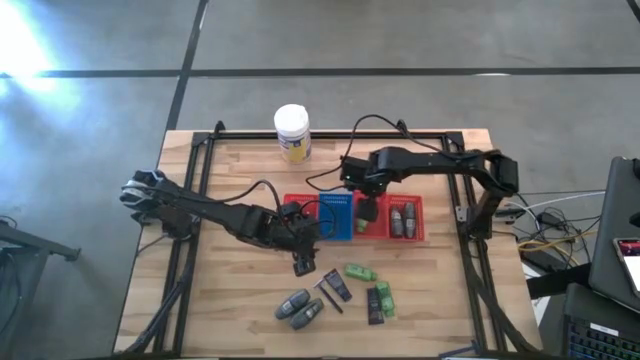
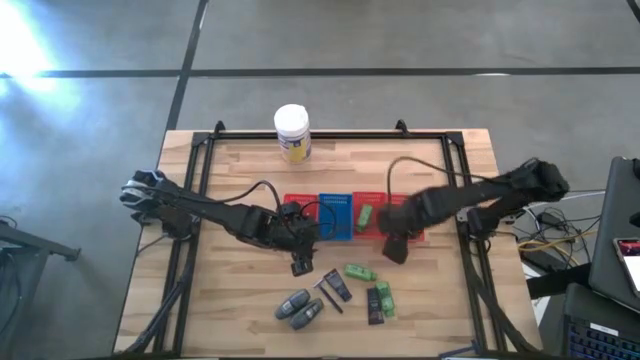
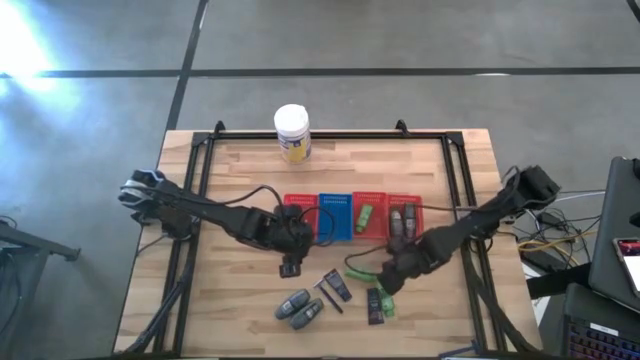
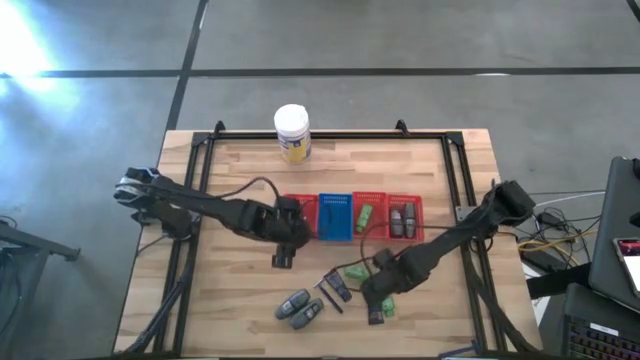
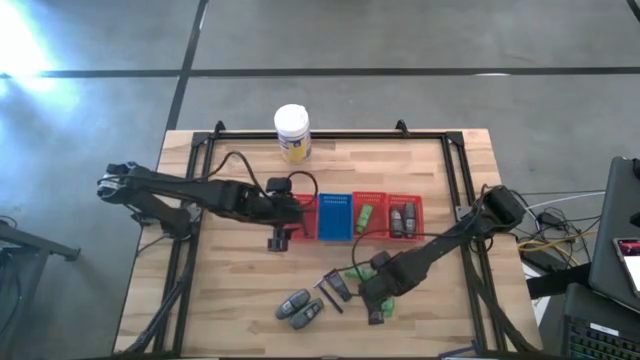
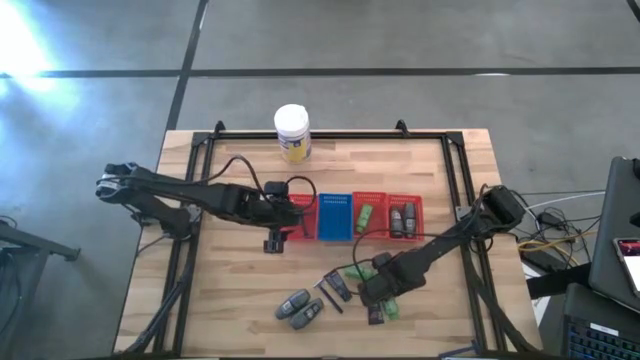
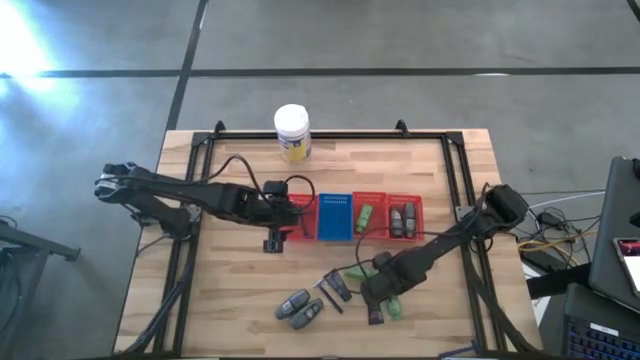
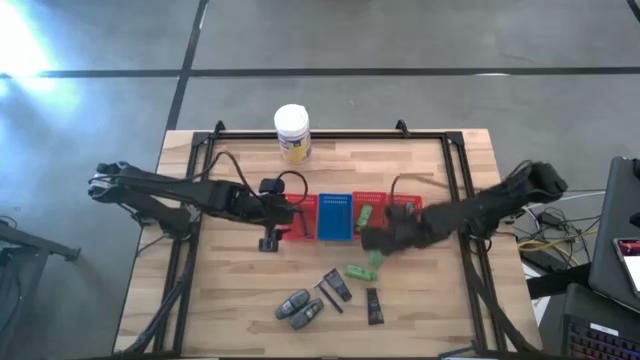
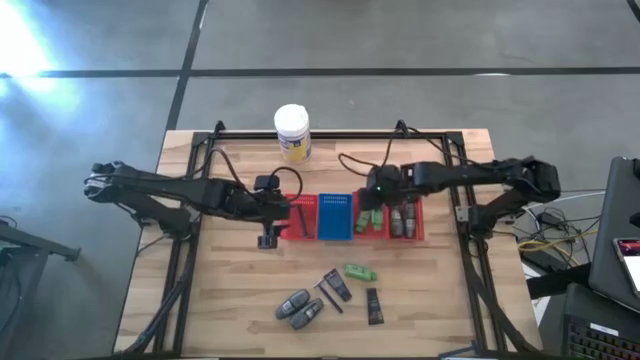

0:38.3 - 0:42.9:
Task: Pick & Place Travel size toiletries
Put the green shampoo into the middle red bin

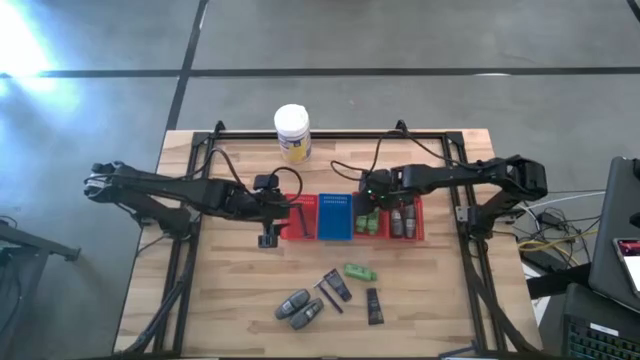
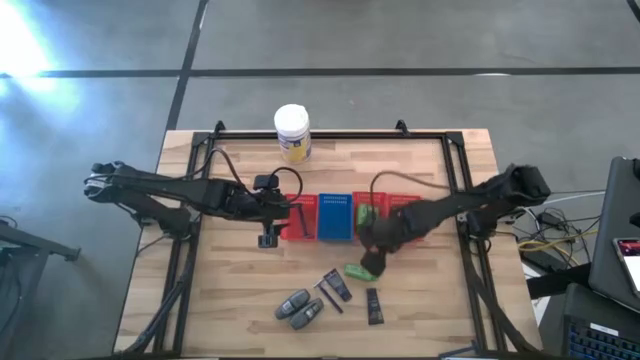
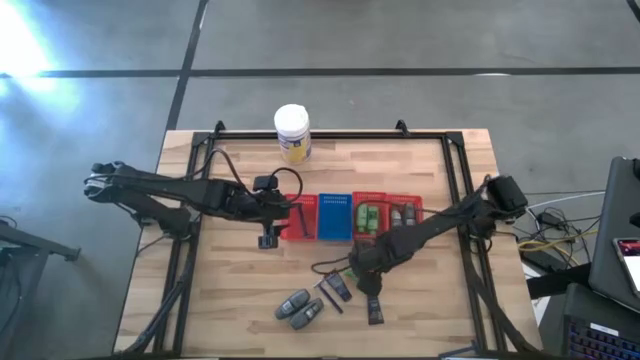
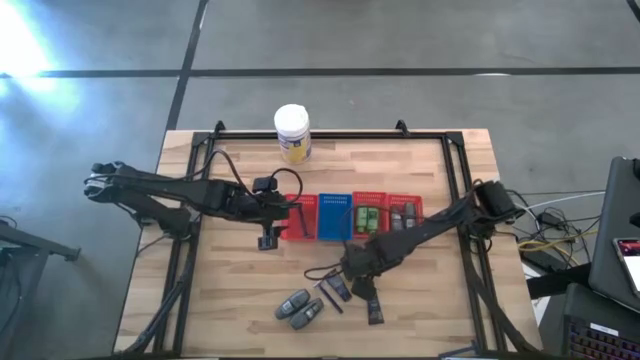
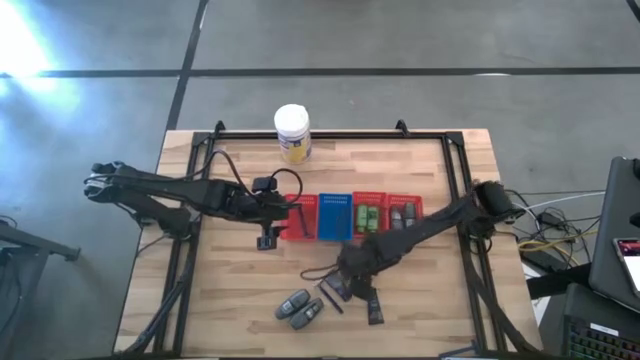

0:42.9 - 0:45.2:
Put the green shampoo into the middle red bin

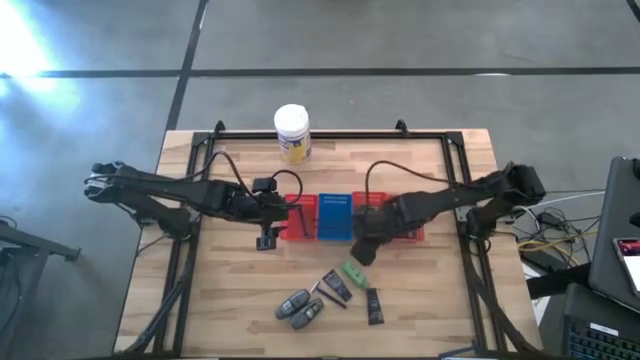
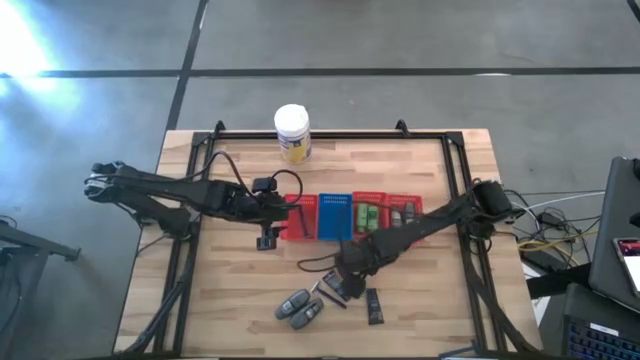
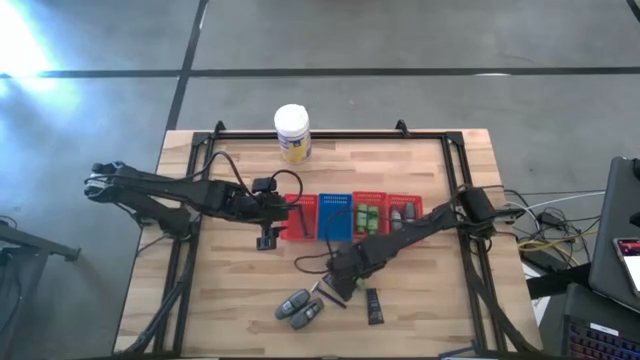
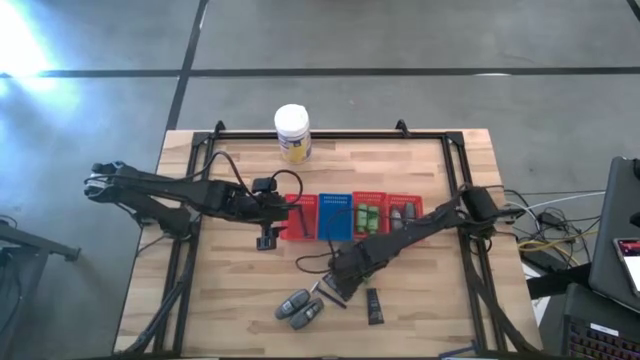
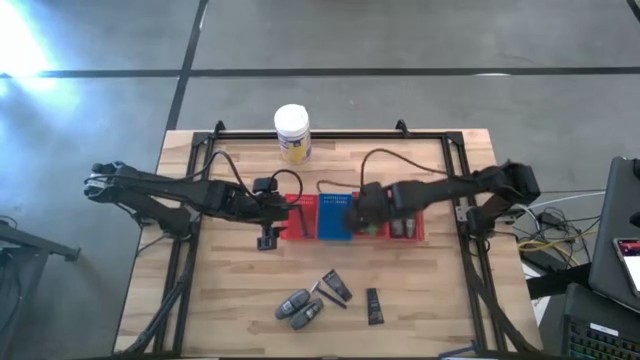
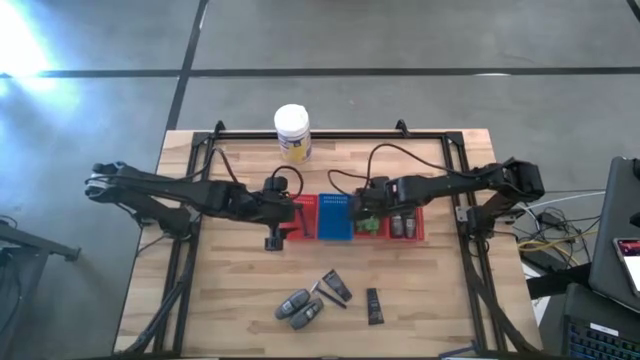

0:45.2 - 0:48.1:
Put the green shampoo into the middle red bin

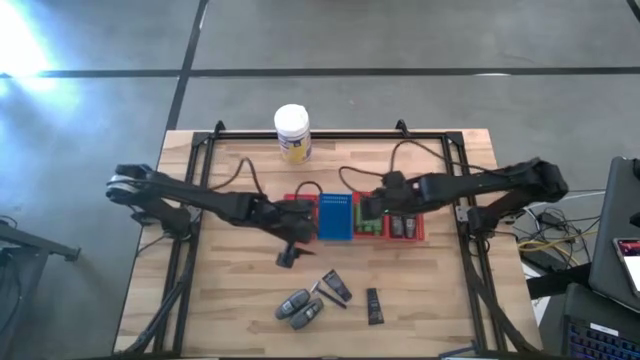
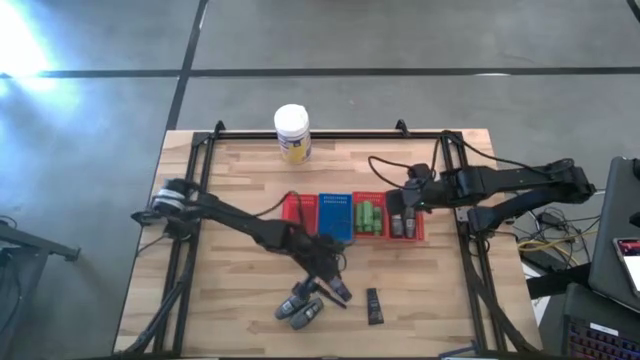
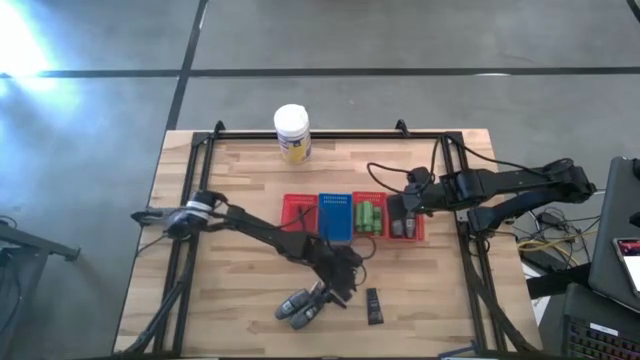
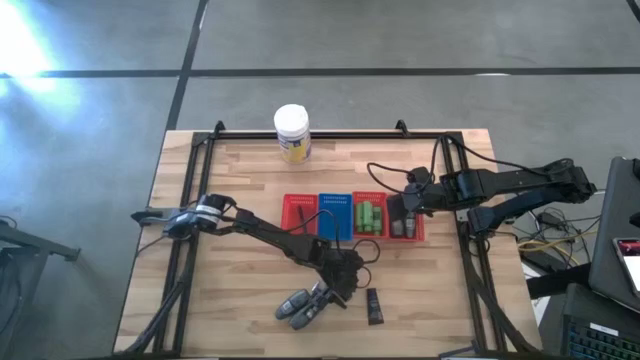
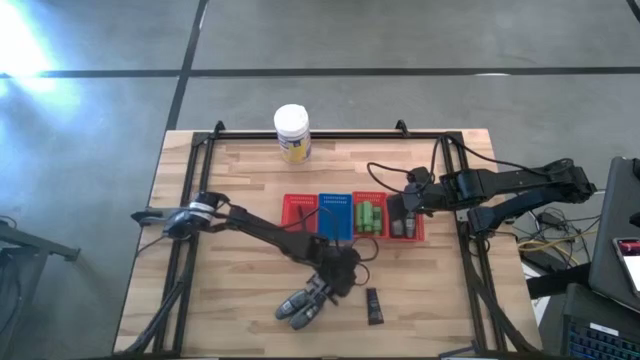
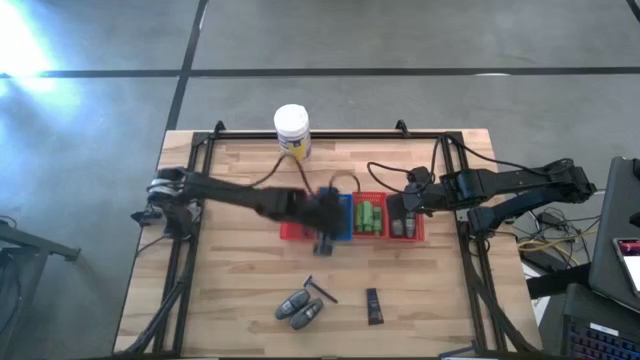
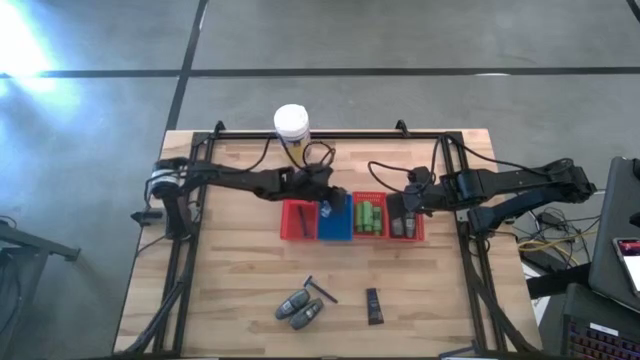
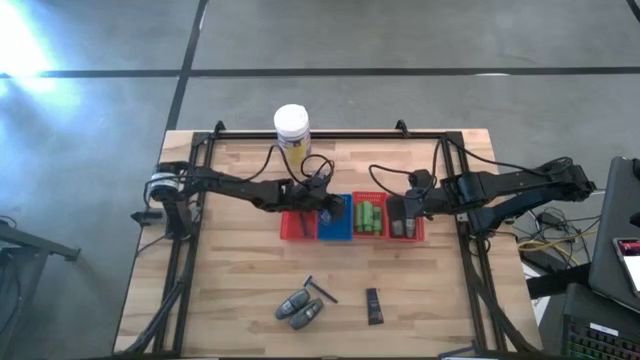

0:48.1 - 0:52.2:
Put the blue shave cream into the blue bin

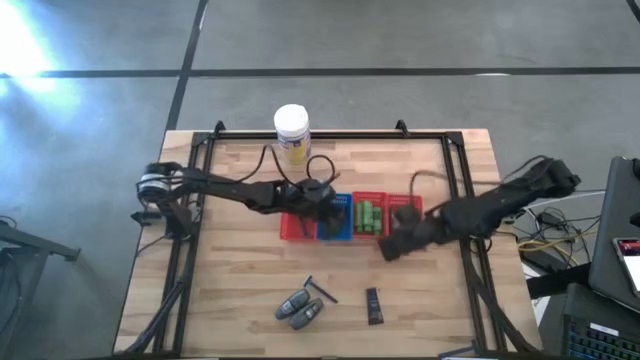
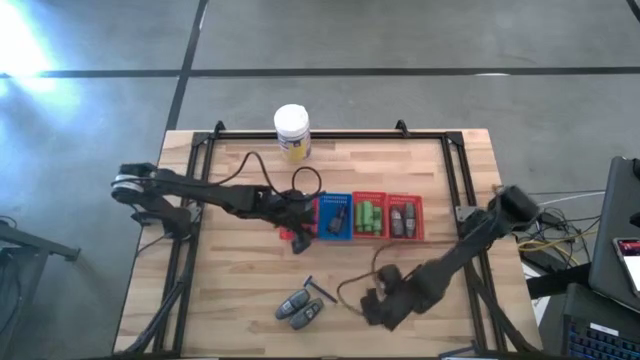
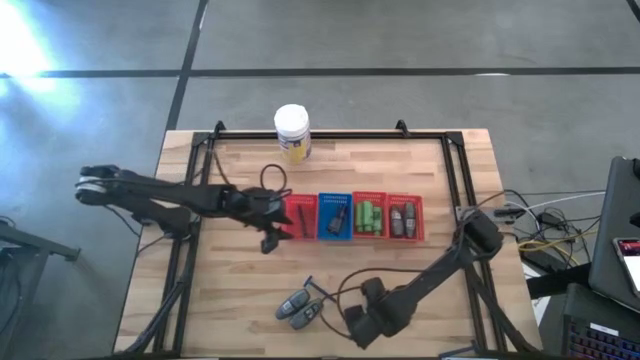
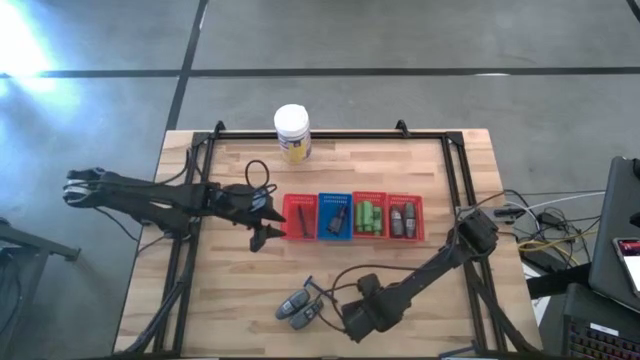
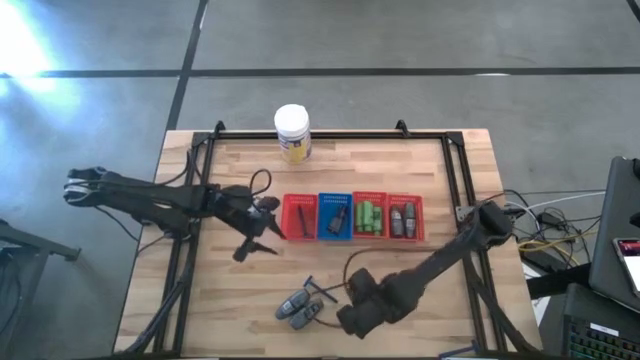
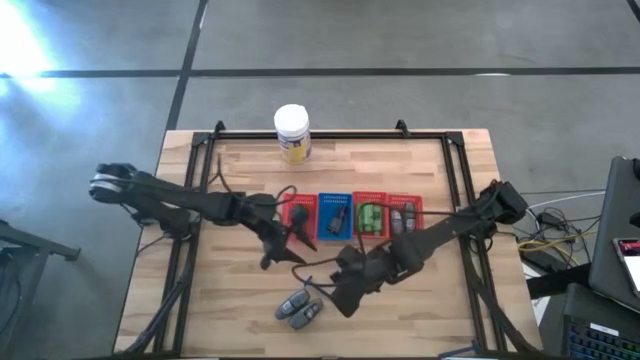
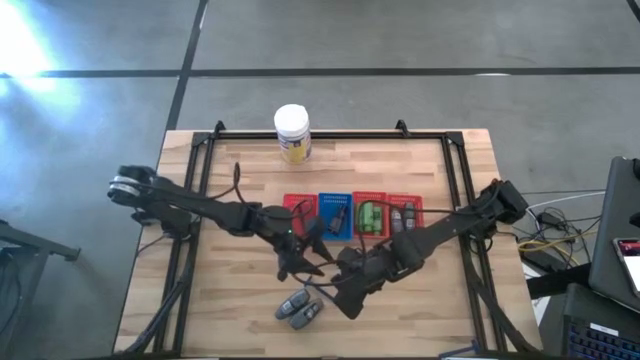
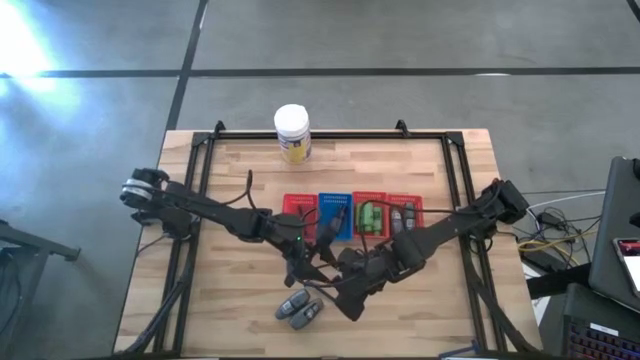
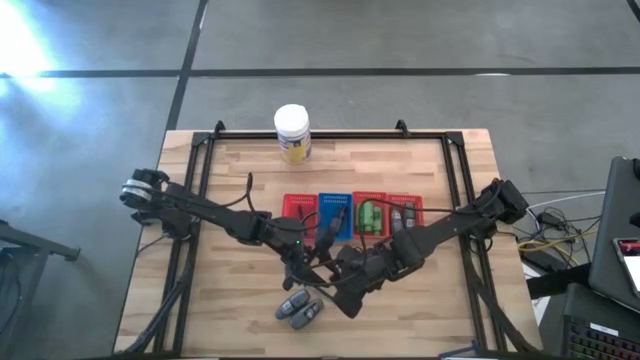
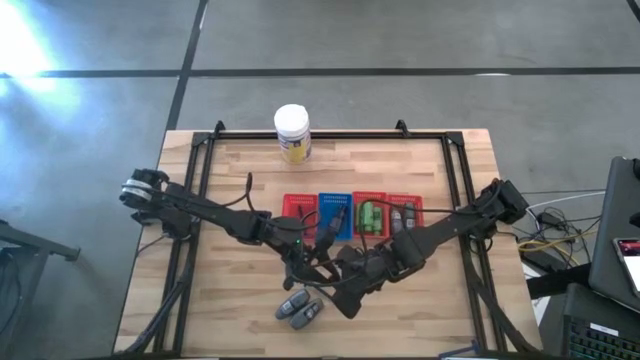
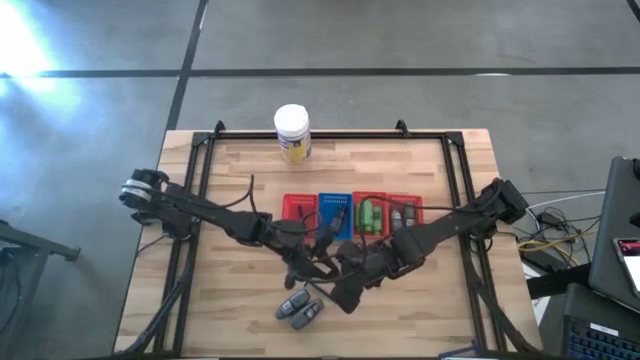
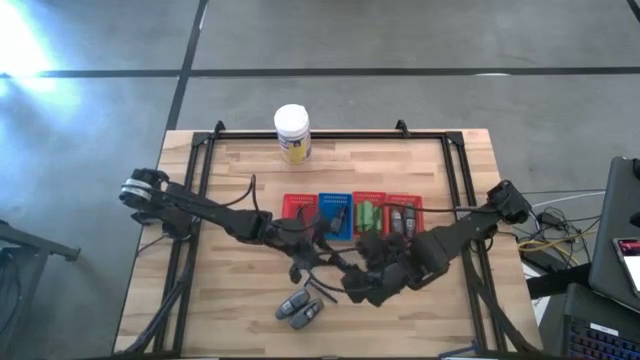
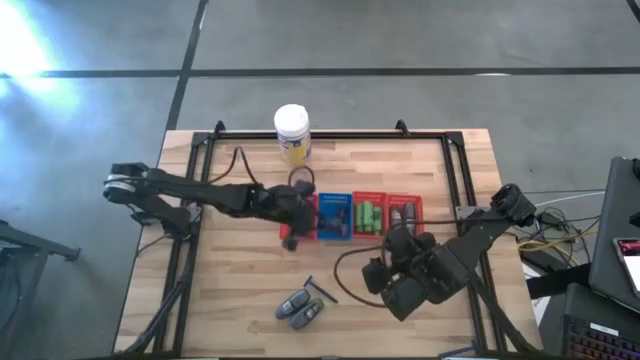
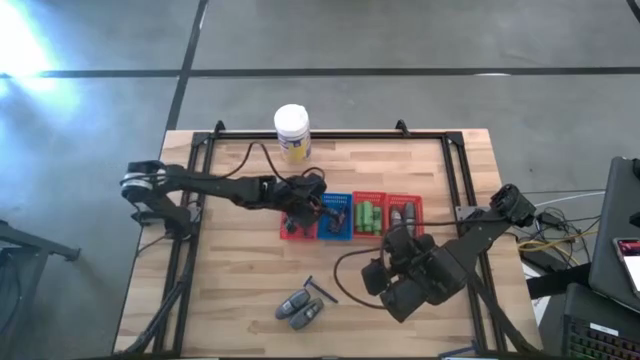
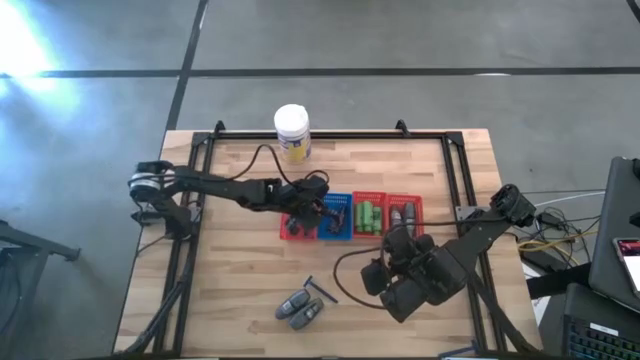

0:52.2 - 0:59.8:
Put the blue shave cream into the blue bin
